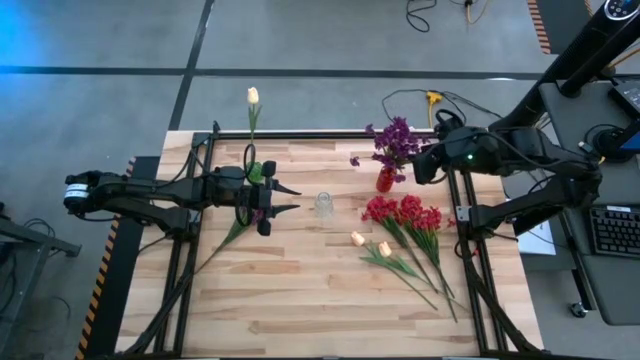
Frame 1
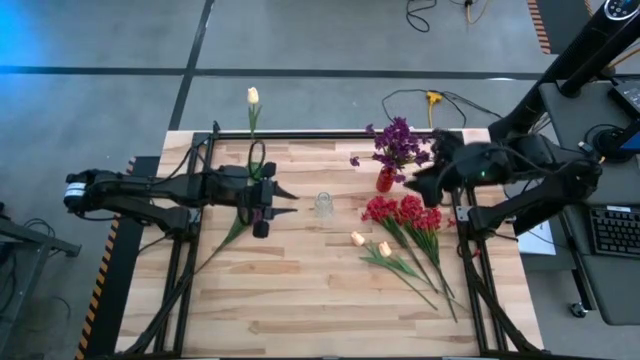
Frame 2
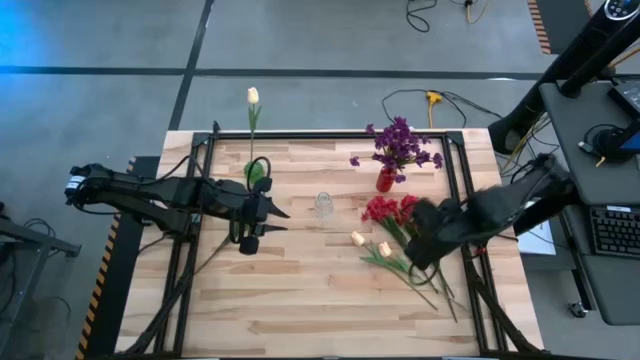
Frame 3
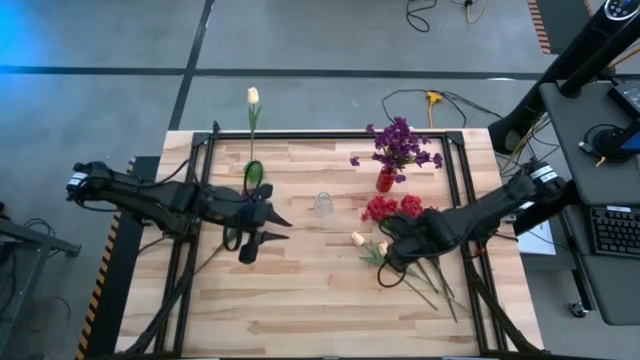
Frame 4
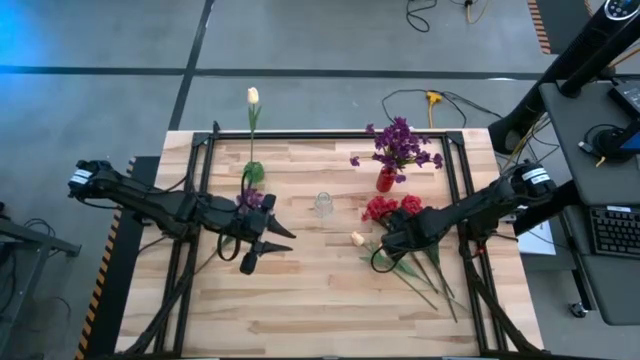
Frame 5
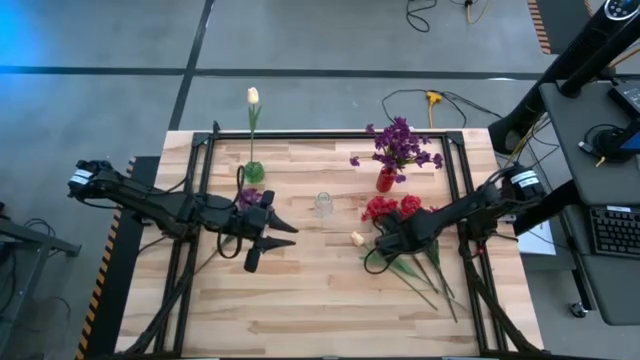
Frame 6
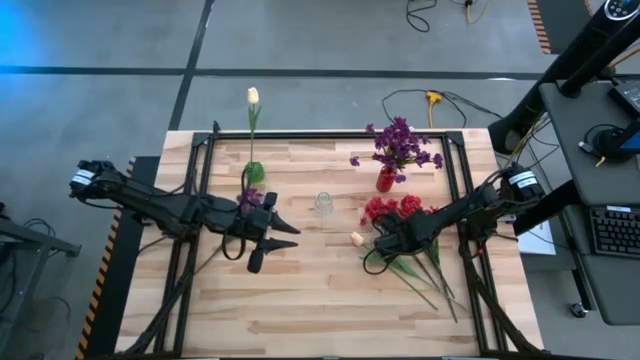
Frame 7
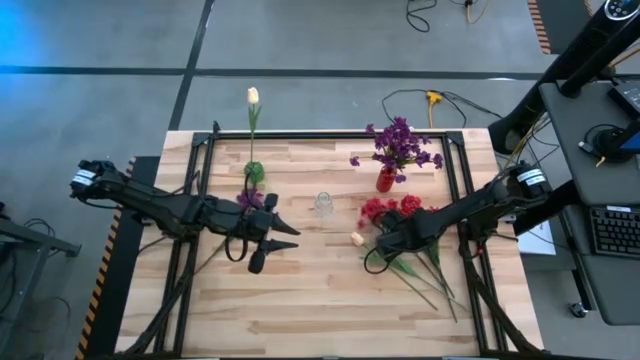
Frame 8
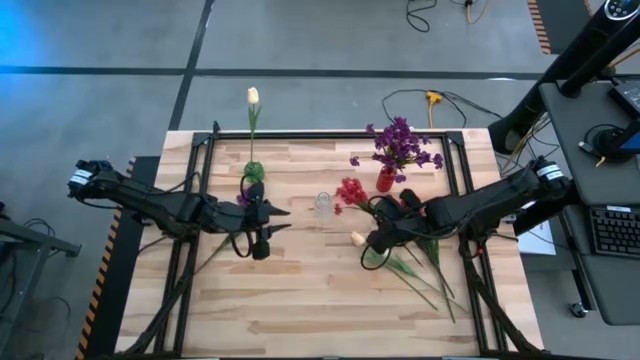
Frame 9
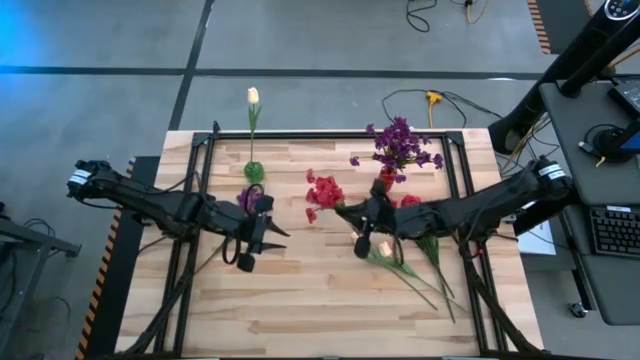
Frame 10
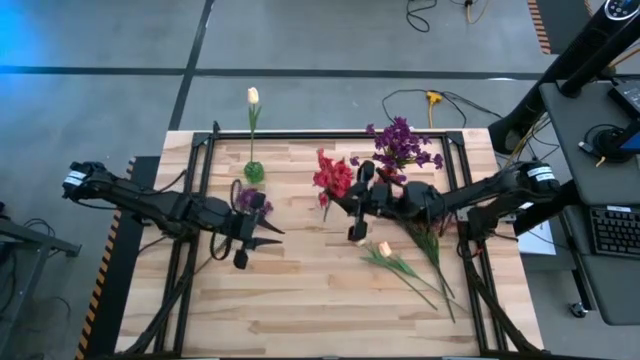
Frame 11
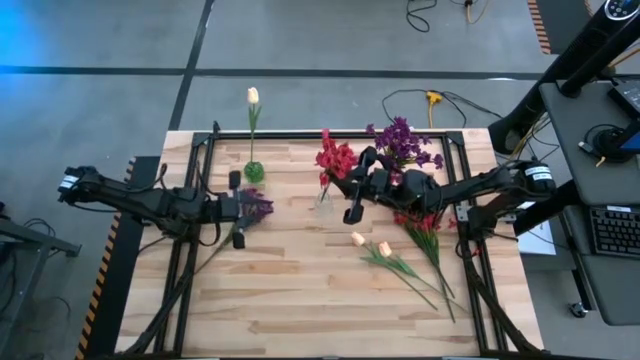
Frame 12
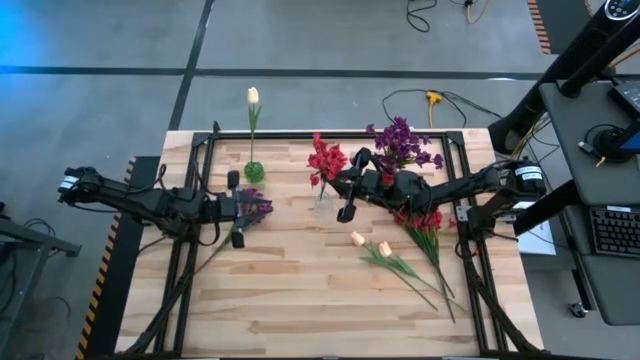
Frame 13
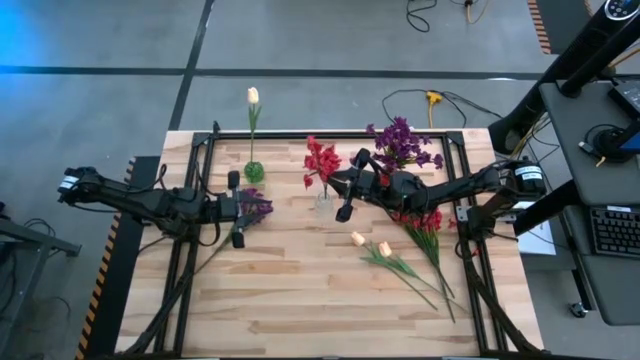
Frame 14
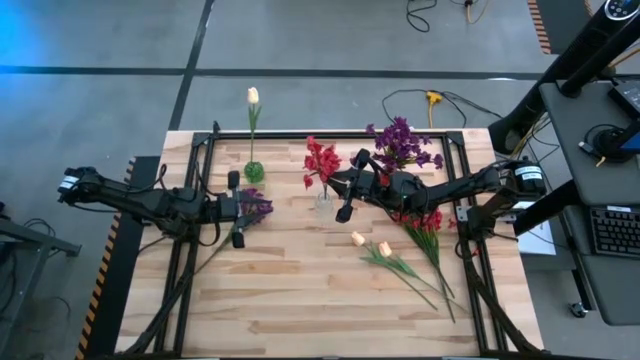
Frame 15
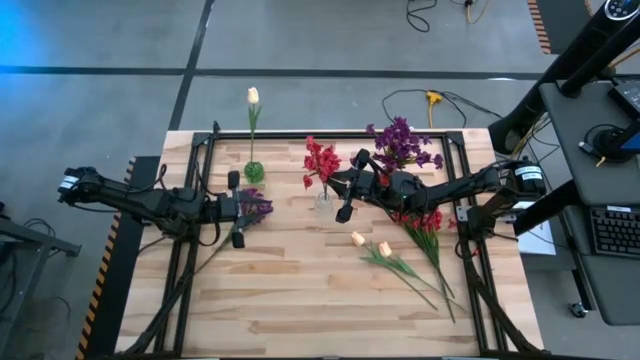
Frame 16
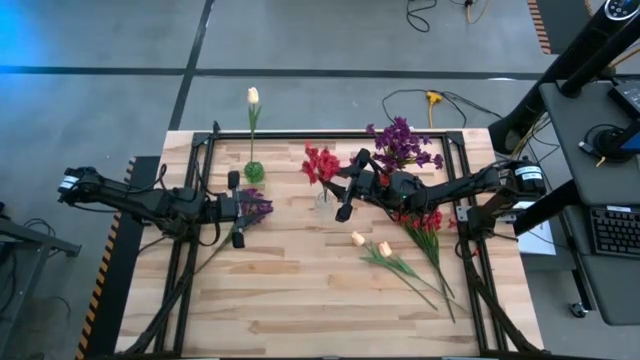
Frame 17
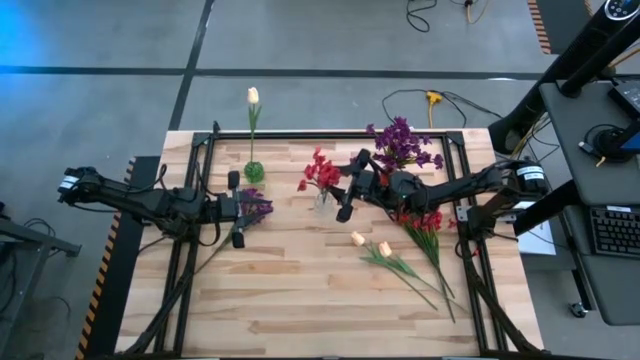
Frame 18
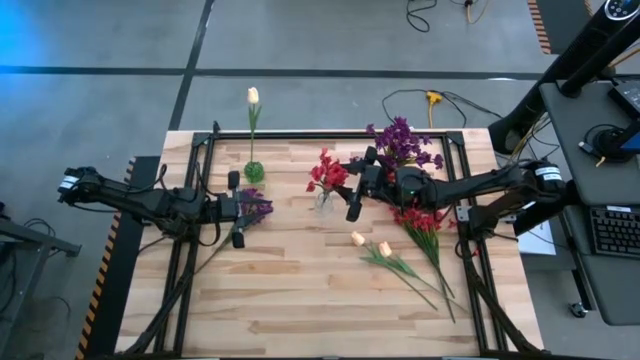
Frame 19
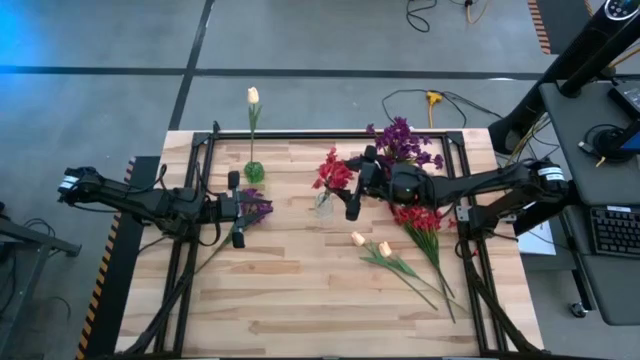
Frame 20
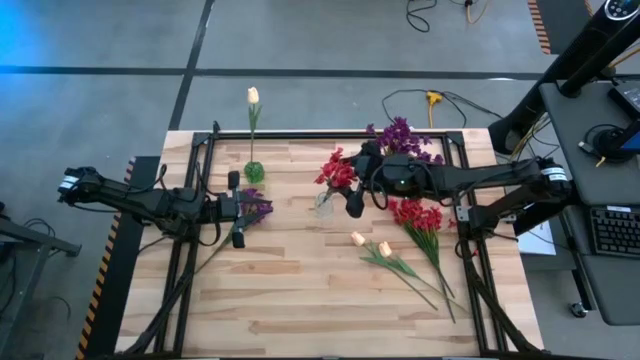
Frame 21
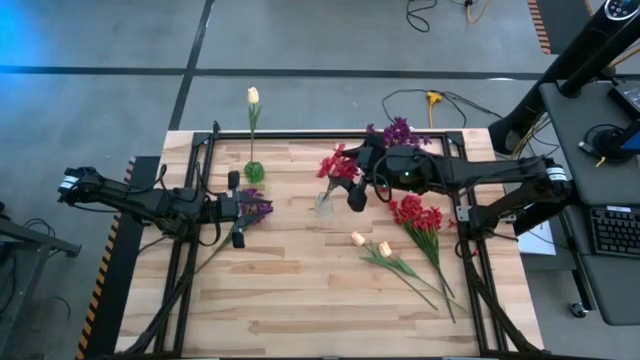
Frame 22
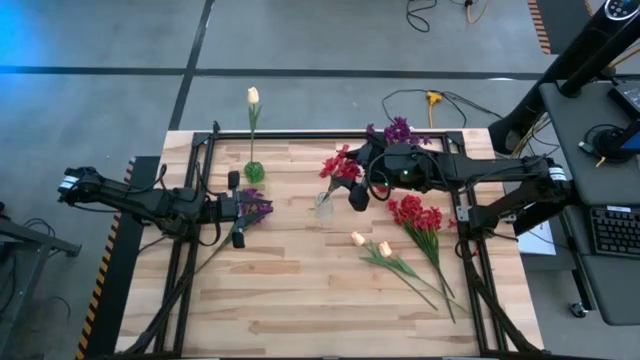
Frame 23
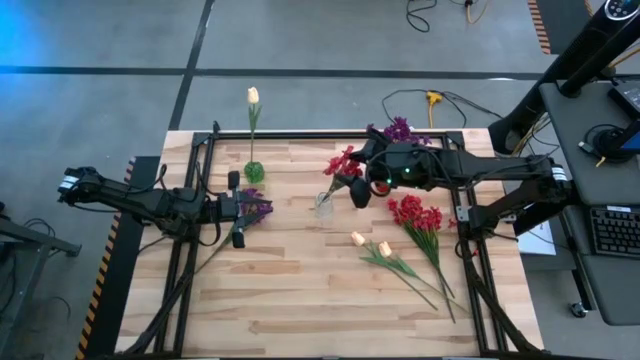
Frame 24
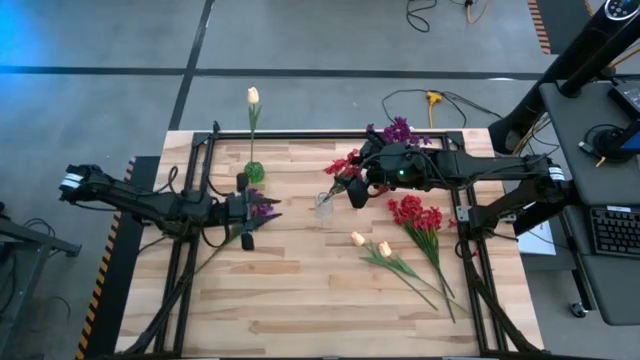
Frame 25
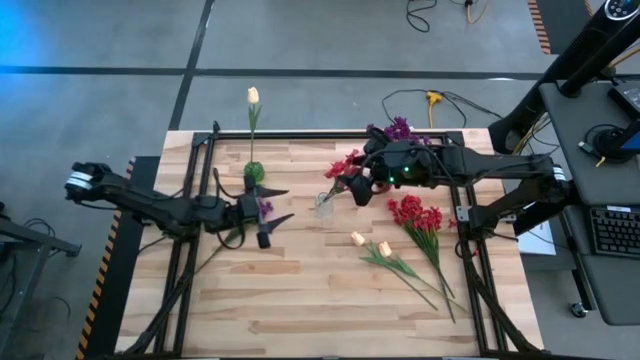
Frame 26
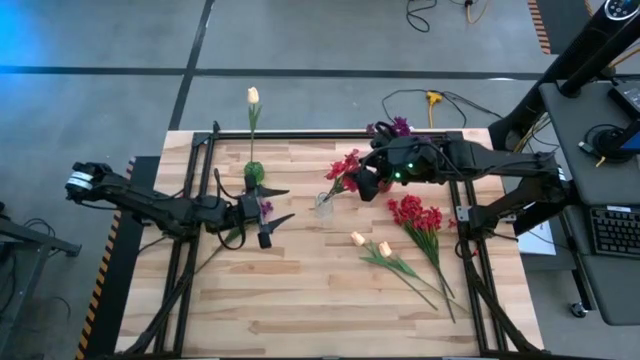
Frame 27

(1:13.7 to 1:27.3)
Task: Sort flowers into vase by color
Put the left red flowers into the transparent vase
